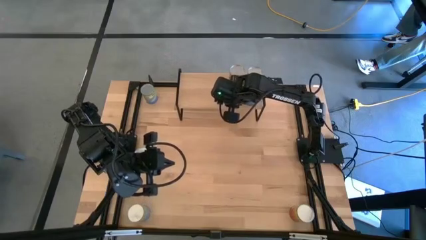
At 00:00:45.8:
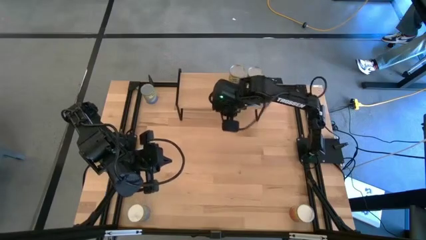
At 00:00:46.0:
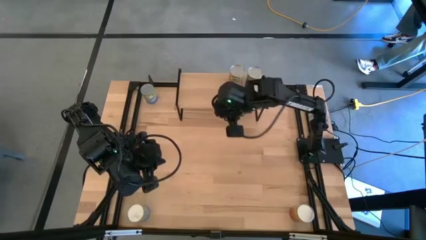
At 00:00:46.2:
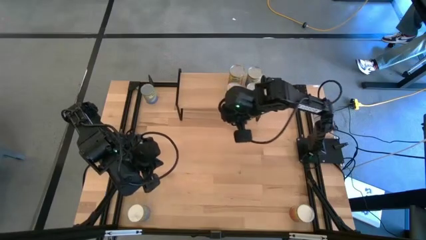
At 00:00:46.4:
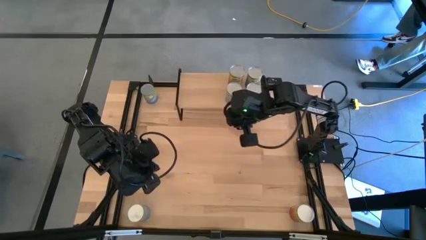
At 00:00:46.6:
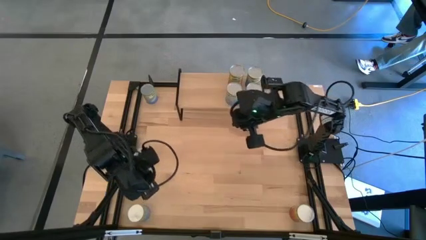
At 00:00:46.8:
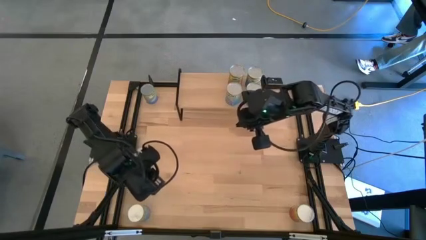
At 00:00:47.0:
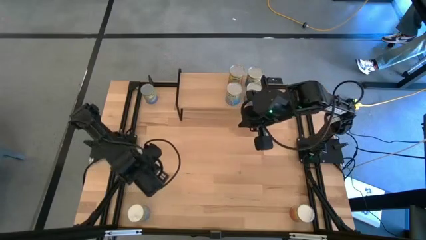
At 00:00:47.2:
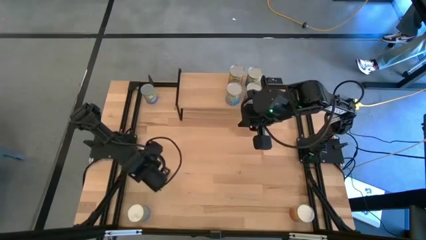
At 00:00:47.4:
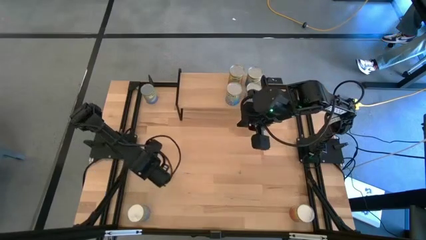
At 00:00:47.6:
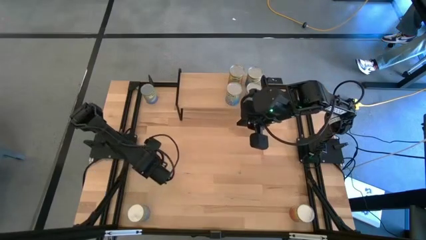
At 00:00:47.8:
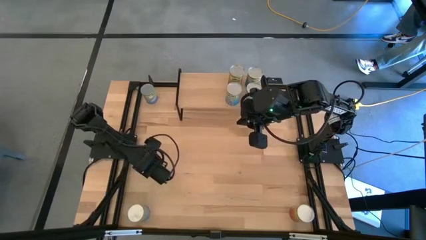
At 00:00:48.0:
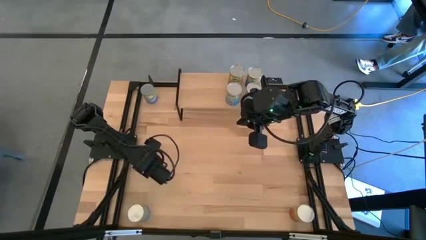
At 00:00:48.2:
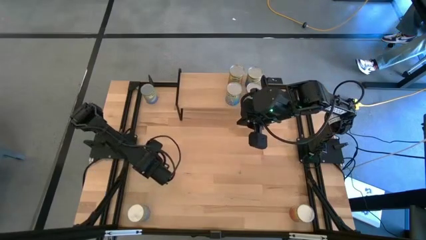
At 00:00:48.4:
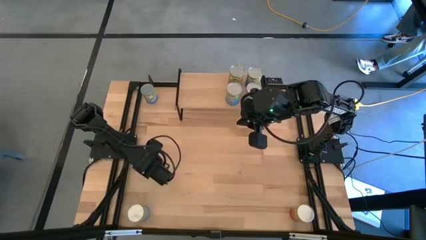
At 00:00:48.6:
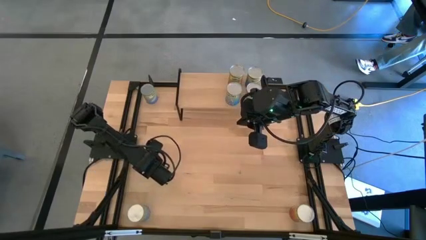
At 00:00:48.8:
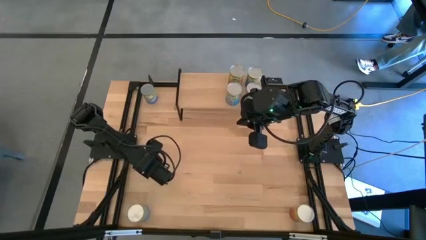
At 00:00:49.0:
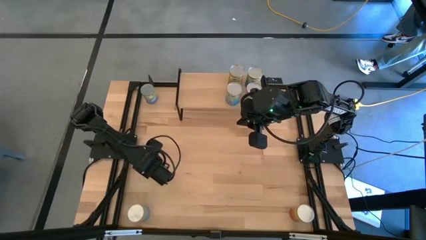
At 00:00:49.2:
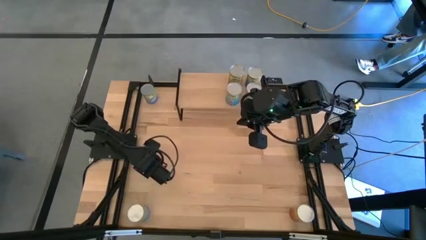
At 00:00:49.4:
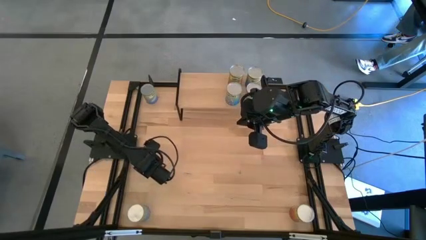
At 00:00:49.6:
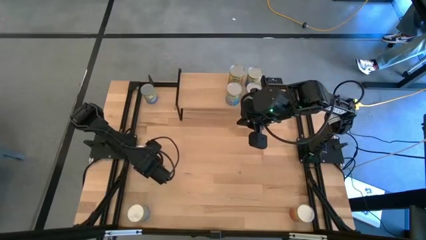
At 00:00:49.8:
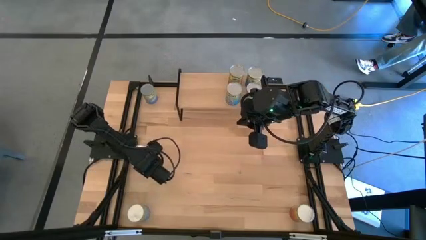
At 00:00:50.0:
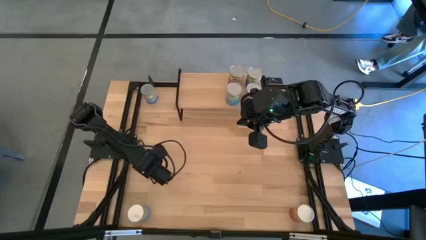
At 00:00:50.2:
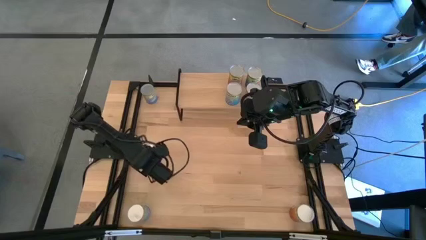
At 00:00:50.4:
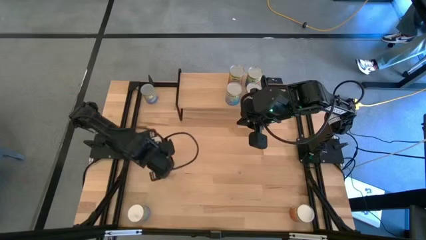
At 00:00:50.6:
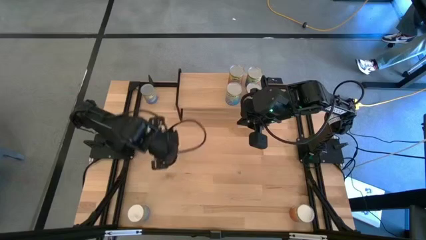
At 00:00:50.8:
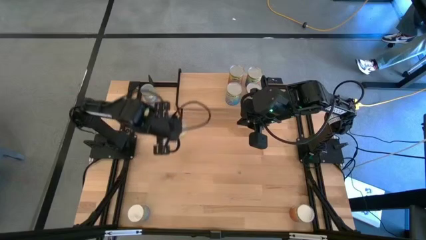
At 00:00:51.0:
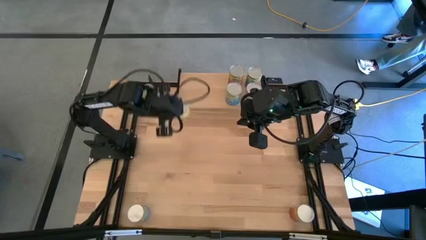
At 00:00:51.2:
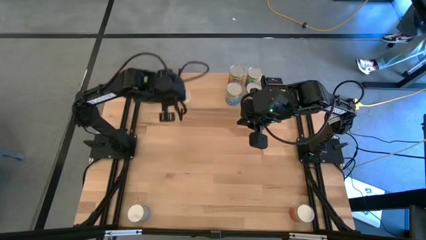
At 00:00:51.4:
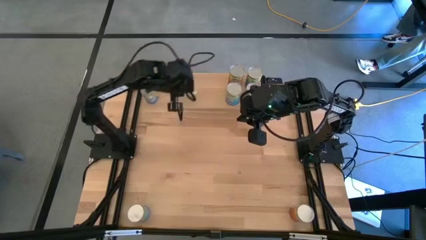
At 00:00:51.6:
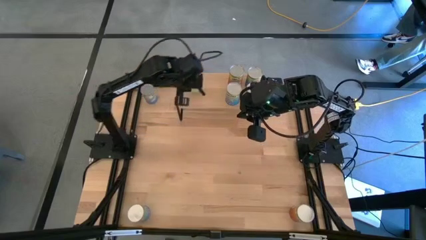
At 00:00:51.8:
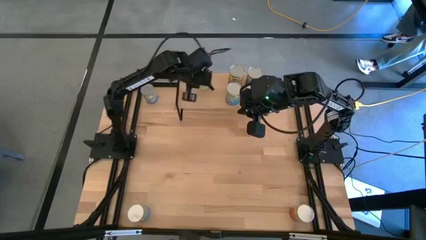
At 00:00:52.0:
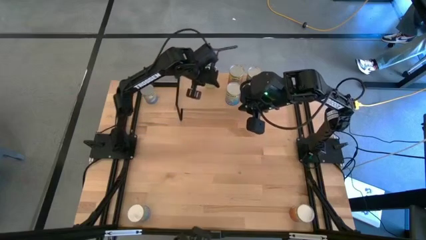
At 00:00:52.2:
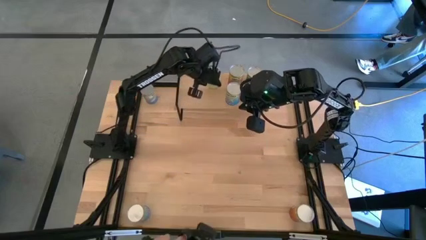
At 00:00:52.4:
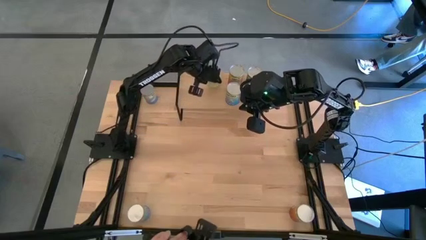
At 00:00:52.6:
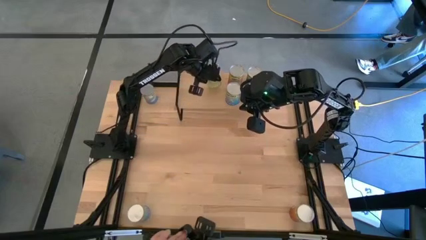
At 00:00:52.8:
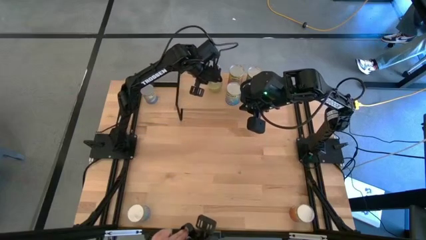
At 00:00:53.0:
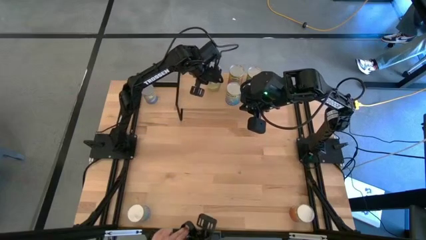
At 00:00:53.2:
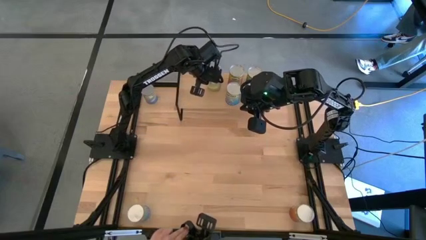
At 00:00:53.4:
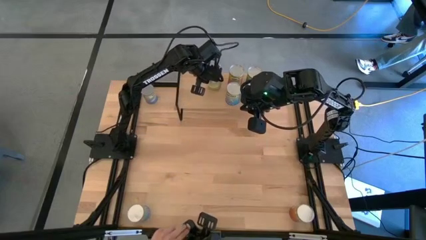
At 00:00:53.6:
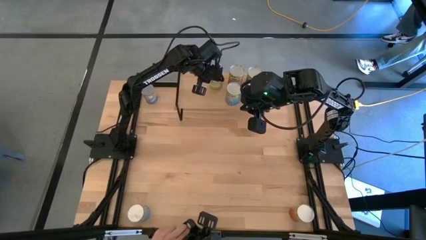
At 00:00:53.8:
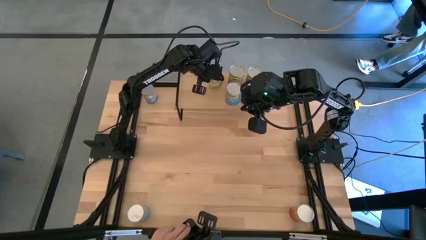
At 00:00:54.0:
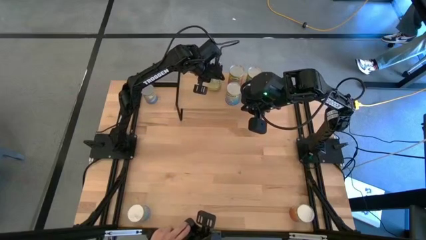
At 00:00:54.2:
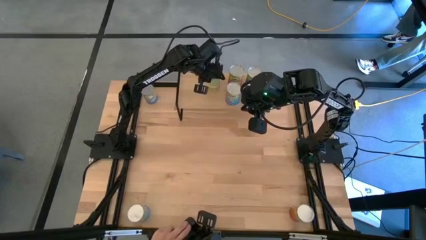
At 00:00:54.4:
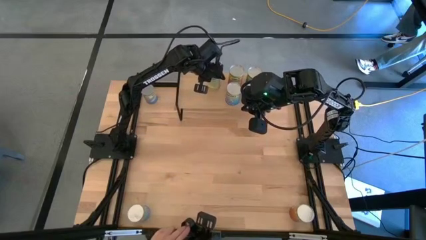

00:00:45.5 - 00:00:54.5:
Task: Pick and place cans onto a shelf
Put the canned carrots on the shelf

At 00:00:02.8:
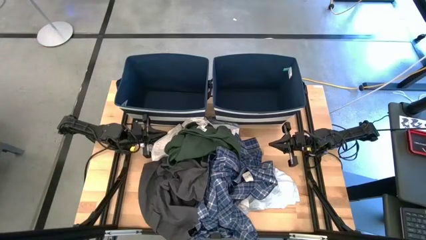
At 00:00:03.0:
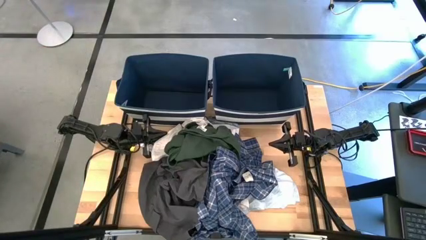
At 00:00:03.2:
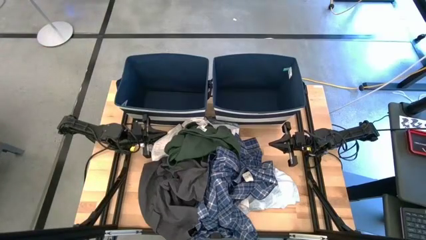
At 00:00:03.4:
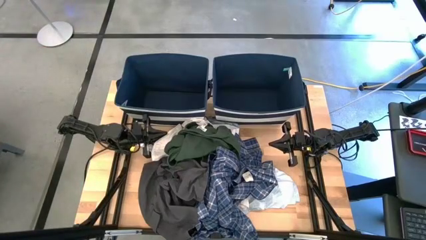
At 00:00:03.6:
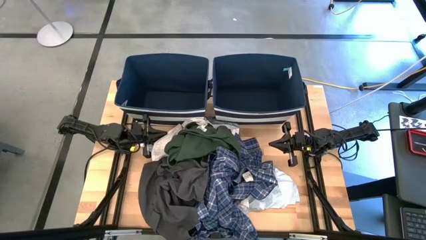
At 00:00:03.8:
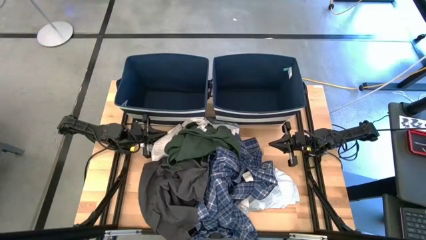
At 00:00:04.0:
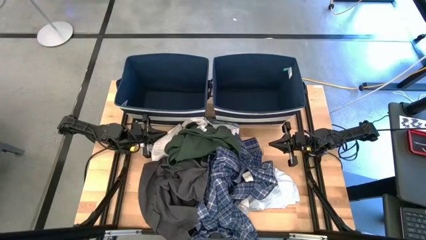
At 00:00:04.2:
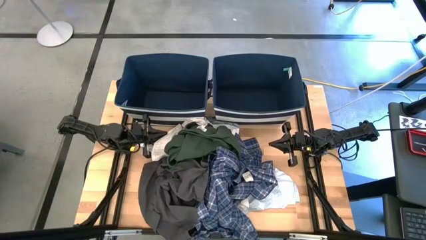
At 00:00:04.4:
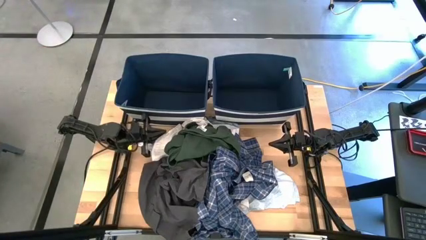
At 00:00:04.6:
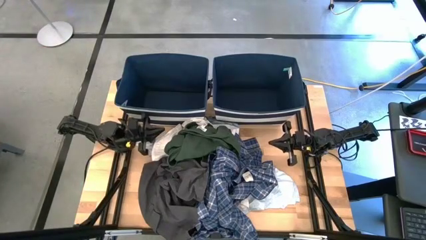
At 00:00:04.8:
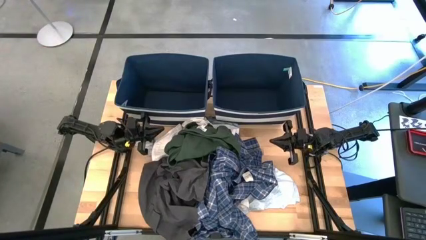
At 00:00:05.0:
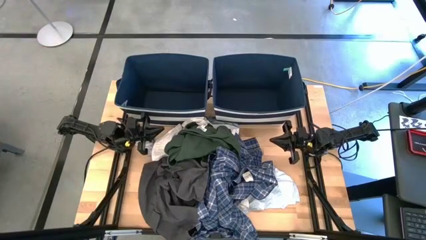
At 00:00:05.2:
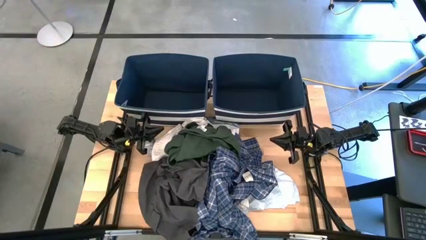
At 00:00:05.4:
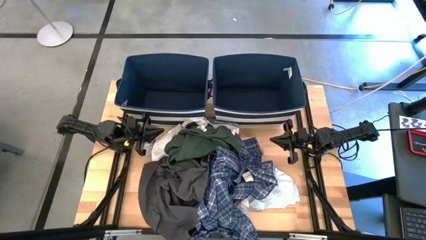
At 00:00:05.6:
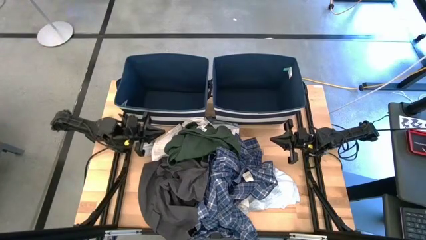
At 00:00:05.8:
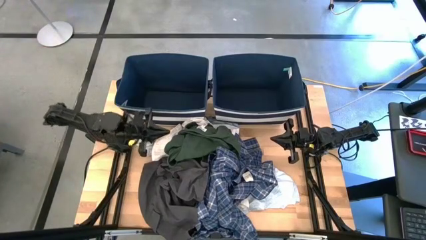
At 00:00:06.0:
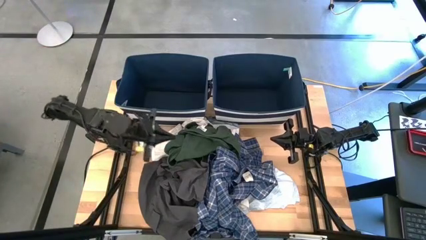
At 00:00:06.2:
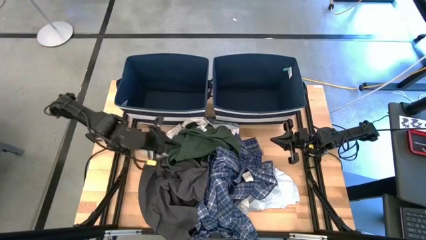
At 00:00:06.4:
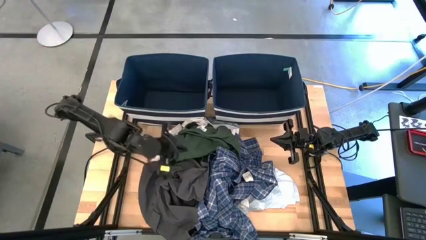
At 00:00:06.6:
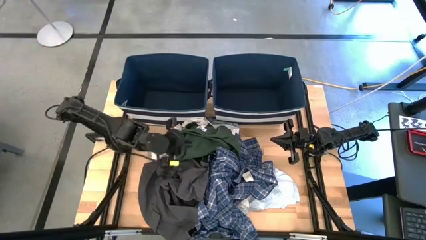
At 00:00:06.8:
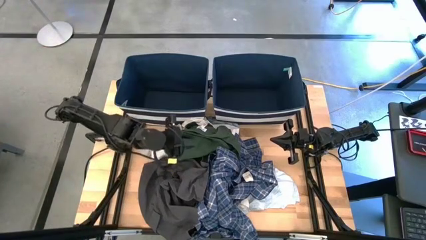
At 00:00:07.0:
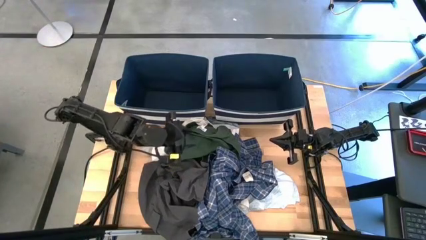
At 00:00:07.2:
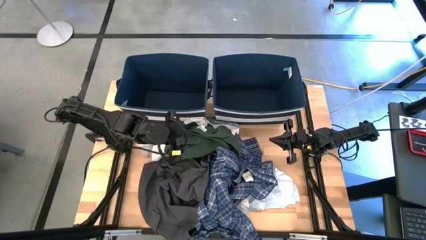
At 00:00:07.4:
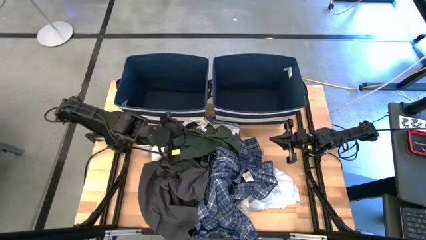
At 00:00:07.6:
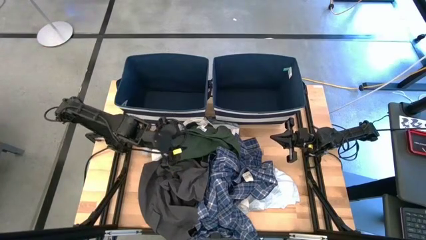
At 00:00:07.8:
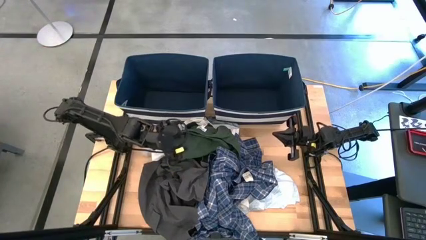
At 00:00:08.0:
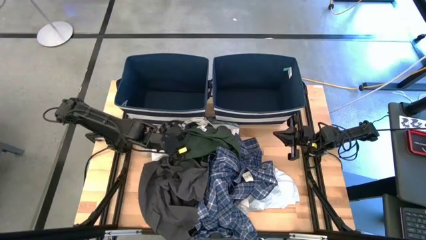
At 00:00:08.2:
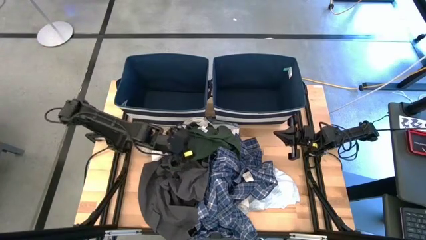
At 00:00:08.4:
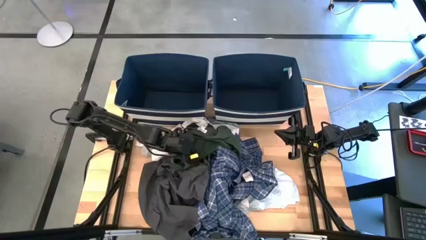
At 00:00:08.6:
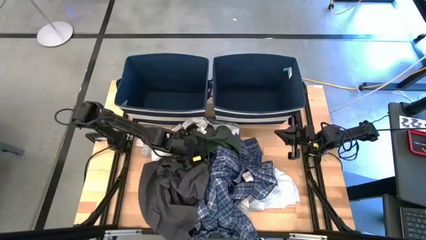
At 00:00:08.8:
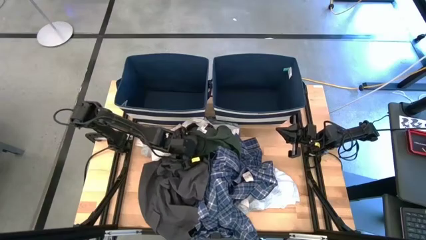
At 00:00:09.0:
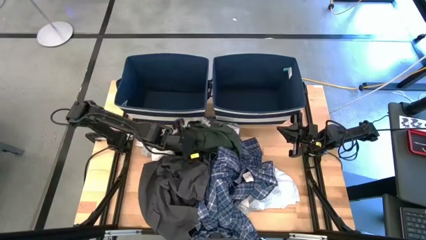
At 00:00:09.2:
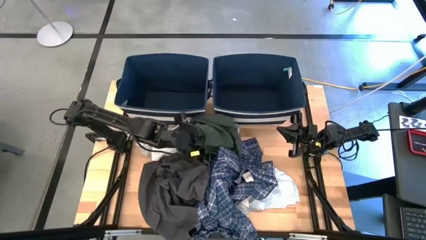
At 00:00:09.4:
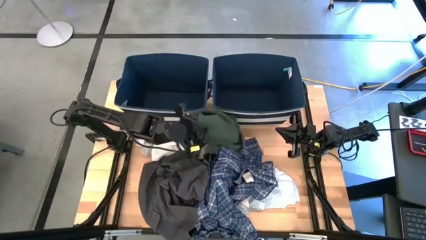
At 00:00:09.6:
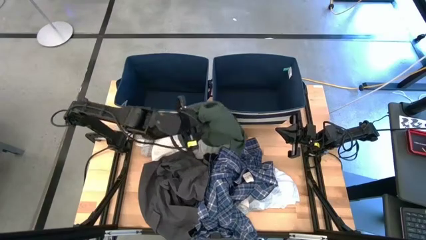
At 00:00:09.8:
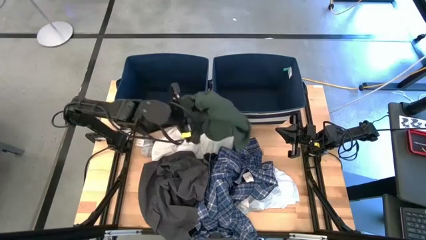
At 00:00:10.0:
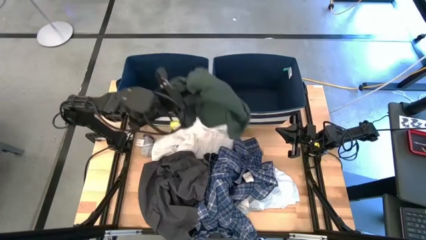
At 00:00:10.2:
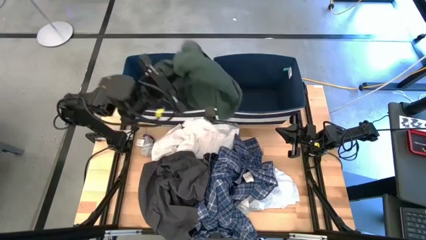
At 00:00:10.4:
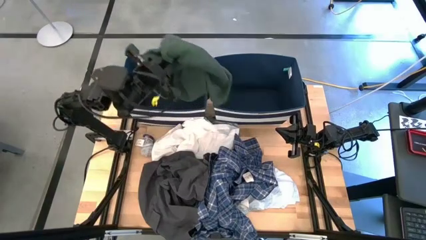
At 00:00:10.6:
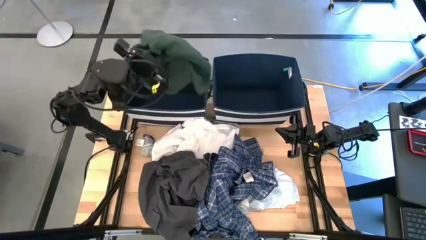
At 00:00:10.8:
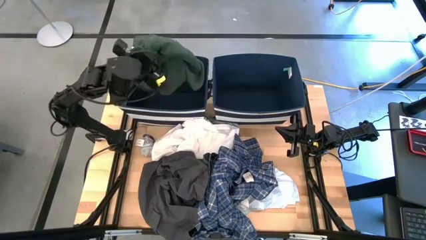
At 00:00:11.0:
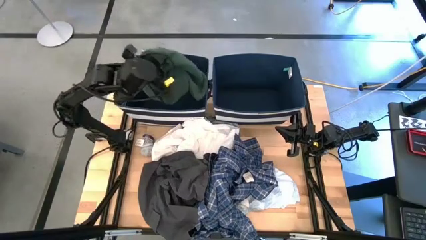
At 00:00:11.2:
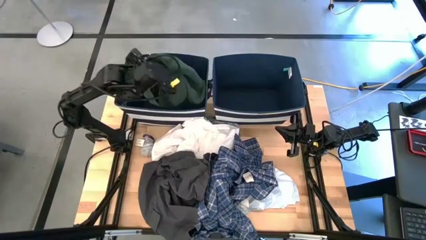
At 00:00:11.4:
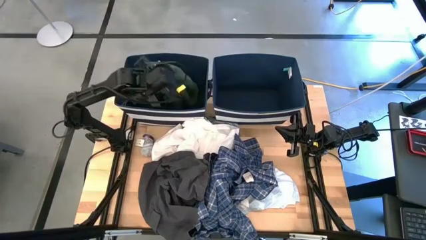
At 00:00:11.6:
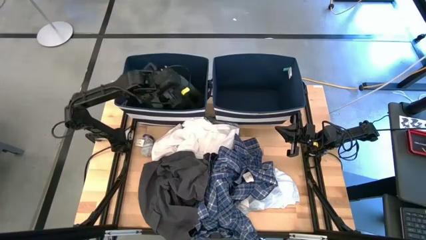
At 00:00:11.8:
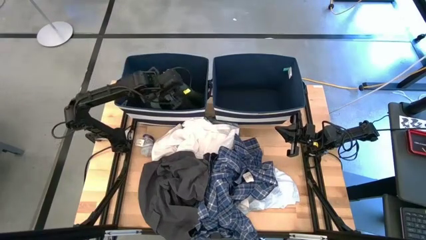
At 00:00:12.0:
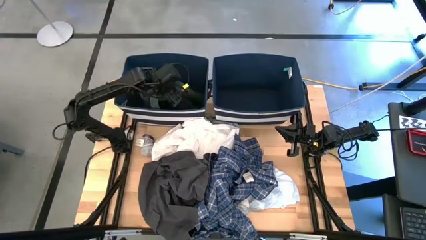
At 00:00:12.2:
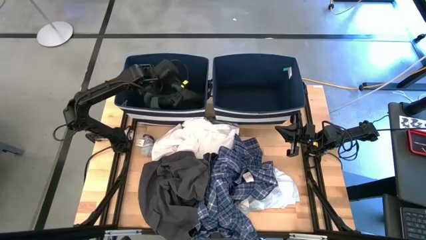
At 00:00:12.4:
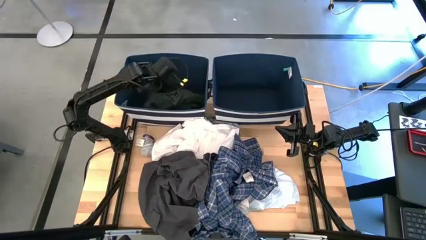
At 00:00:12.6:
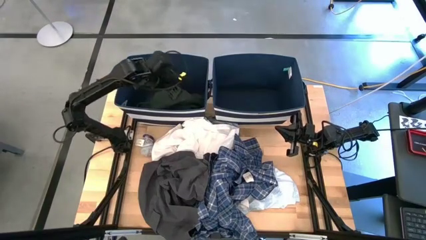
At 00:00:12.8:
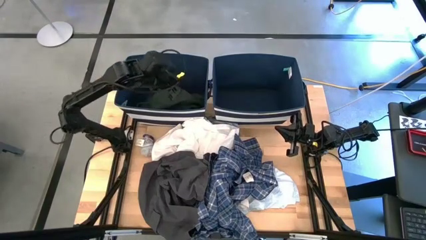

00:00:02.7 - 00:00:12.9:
Task: Sort clothes
Put the dark green shirt into the left blue laundry bin
